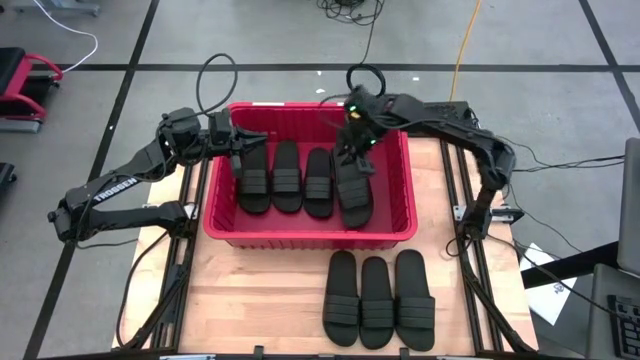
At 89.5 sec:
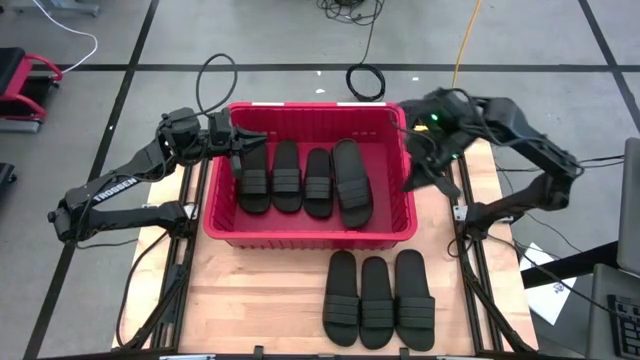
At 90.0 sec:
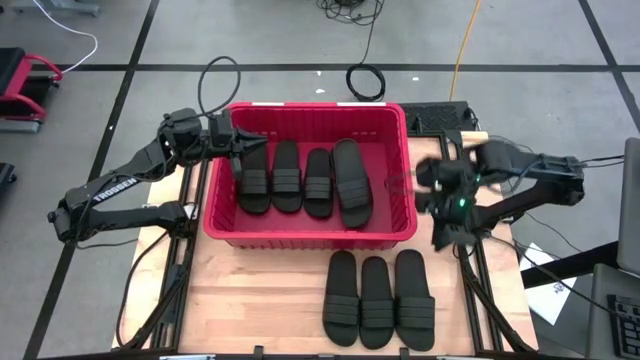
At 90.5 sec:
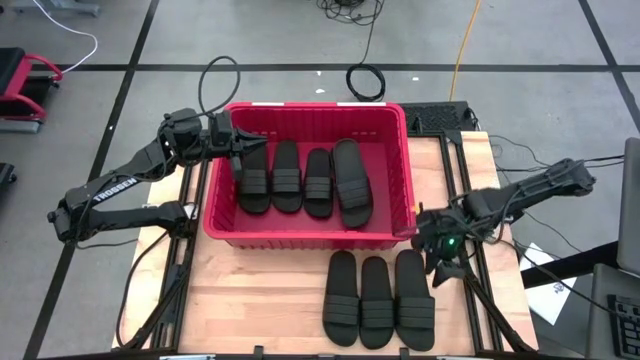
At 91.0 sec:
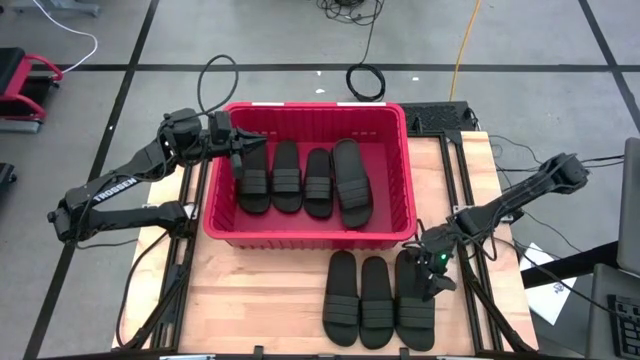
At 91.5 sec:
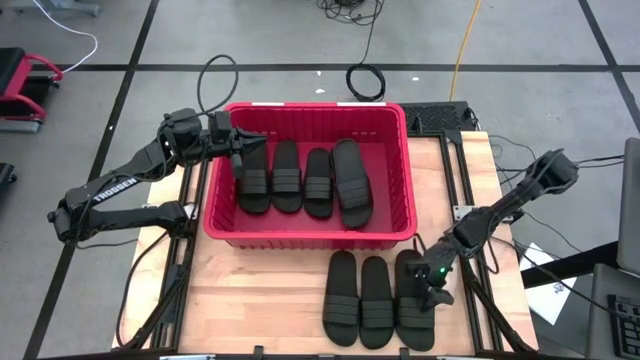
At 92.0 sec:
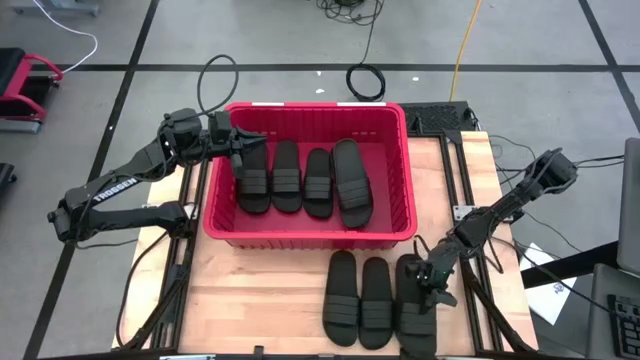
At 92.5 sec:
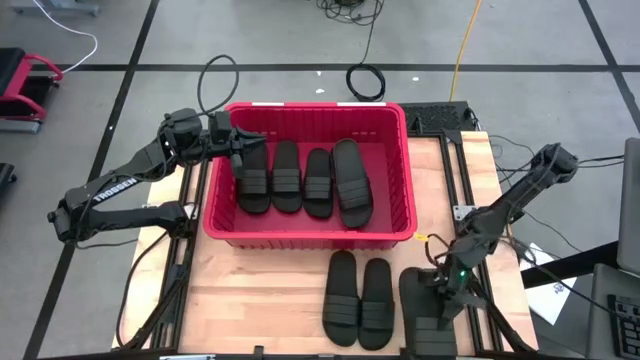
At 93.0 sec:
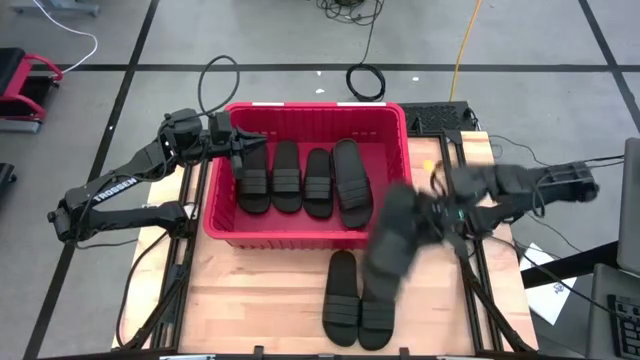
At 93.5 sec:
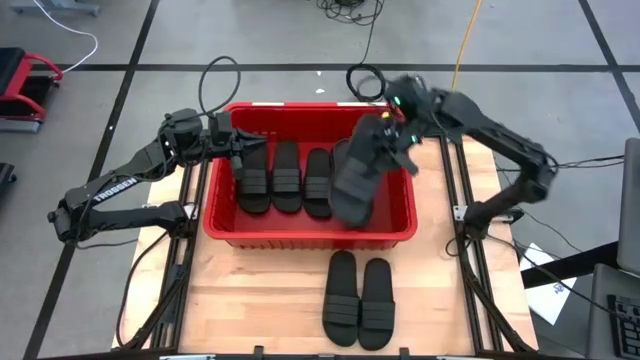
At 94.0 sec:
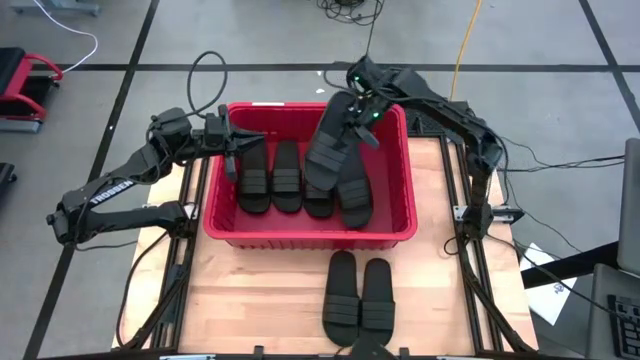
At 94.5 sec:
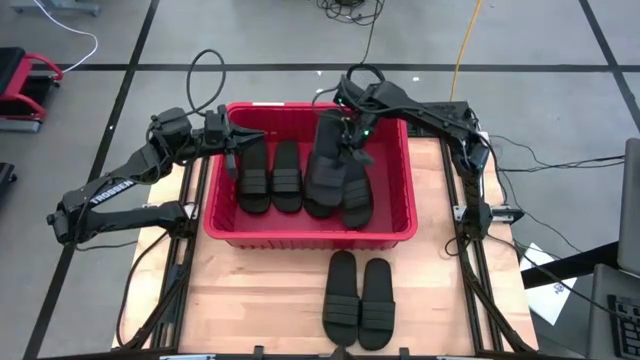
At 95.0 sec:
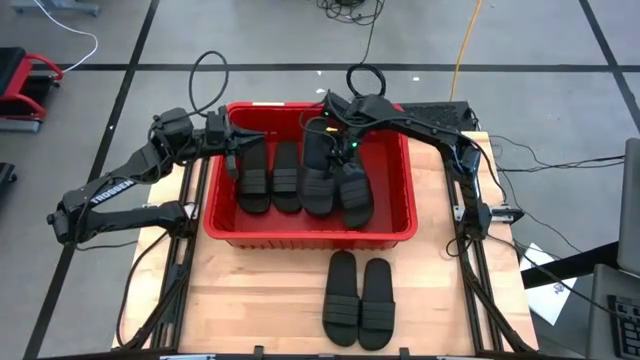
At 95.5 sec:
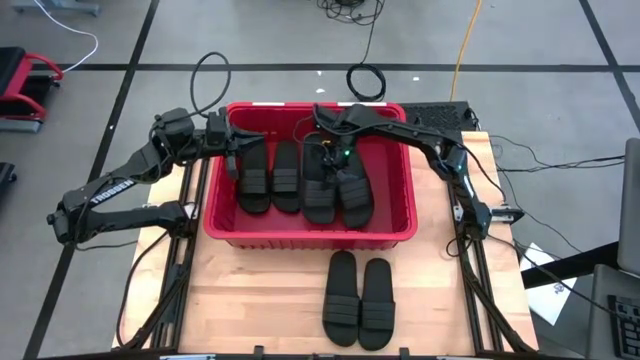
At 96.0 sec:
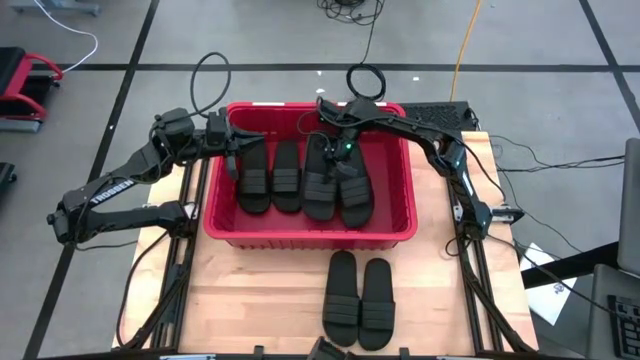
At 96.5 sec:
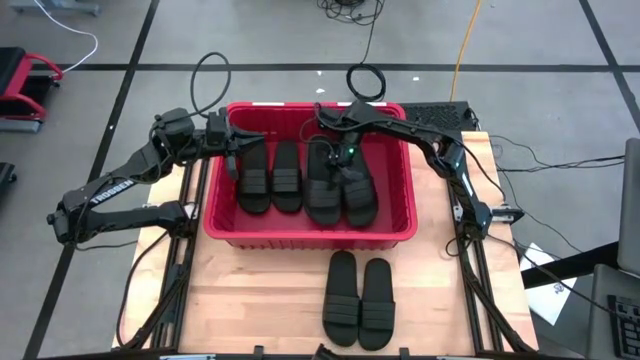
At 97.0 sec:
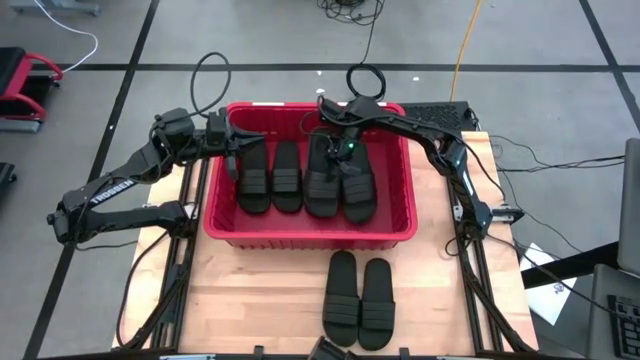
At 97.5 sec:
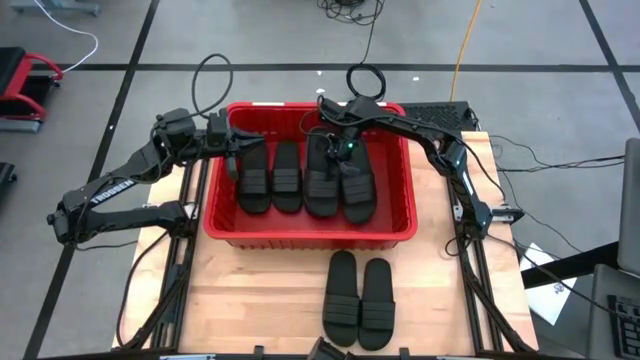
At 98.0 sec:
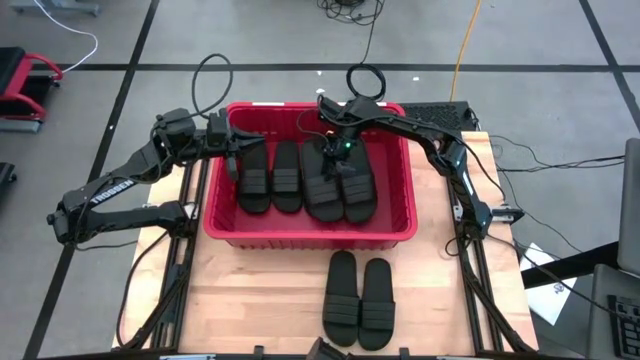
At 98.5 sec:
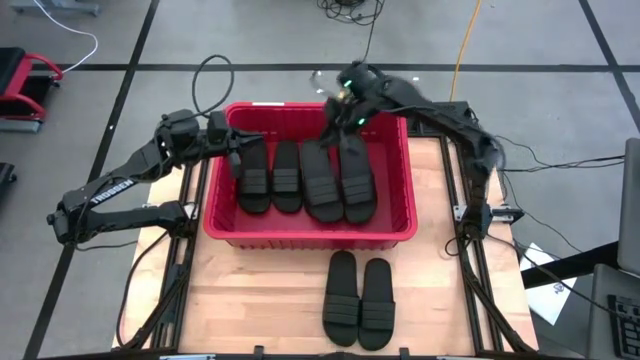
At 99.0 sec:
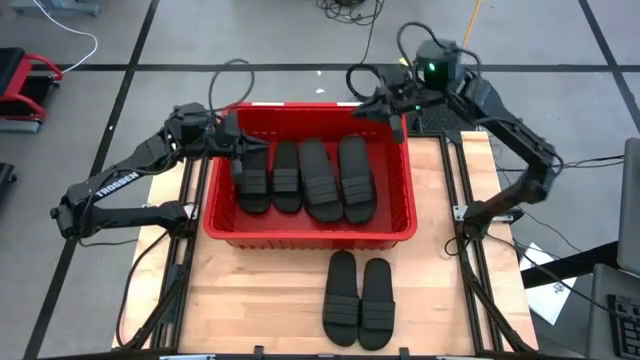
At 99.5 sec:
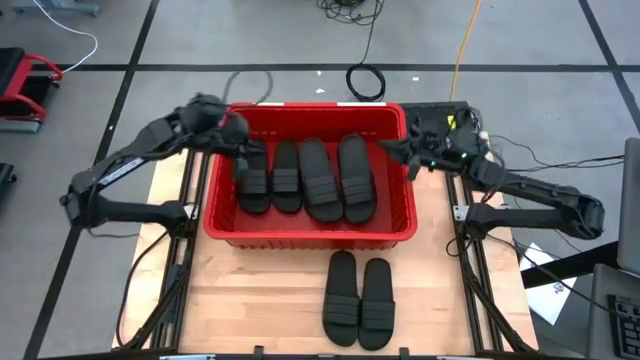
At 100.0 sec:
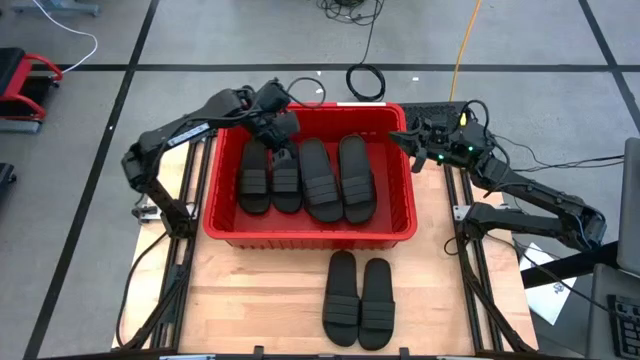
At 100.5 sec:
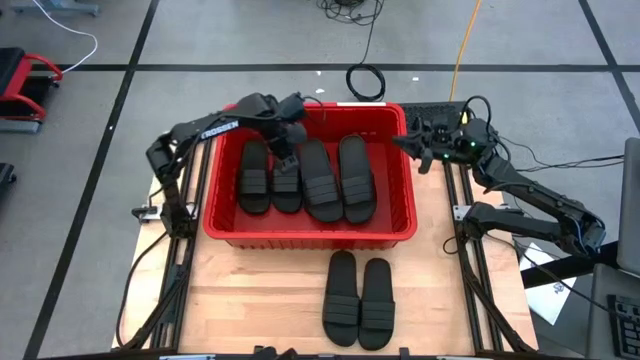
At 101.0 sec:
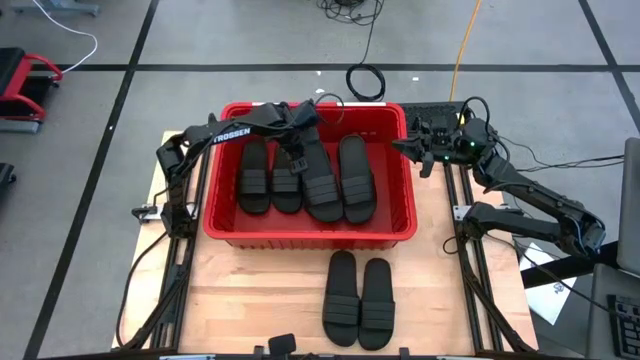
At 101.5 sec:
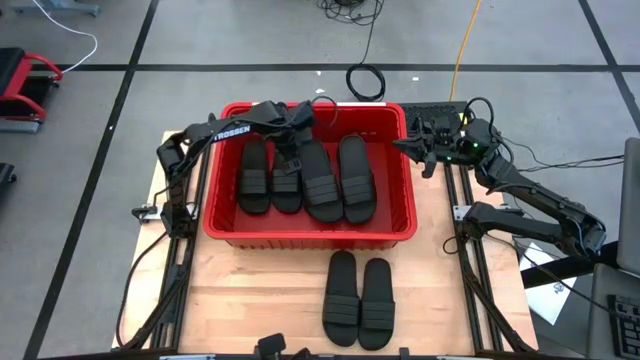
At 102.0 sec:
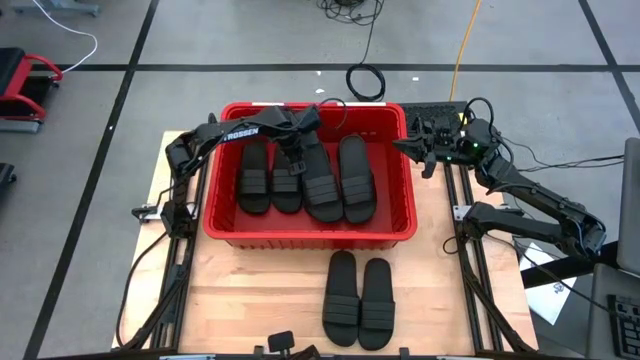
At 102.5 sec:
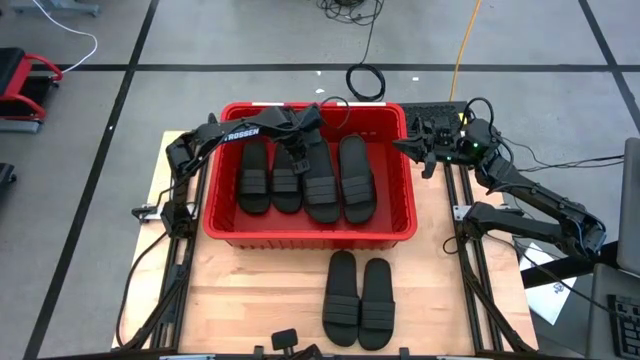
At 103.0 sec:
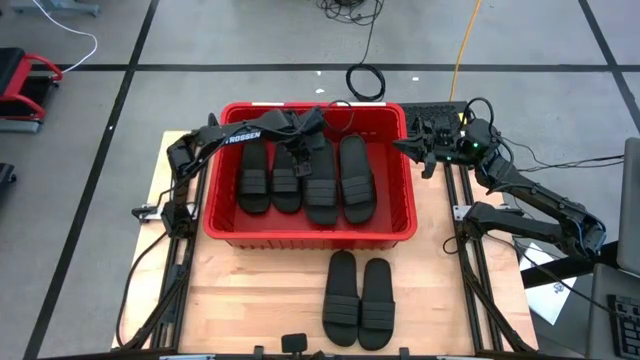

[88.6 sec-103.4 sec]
Task: Pick and place slides into bin
Put the slipper on top of the slipper inside the bin

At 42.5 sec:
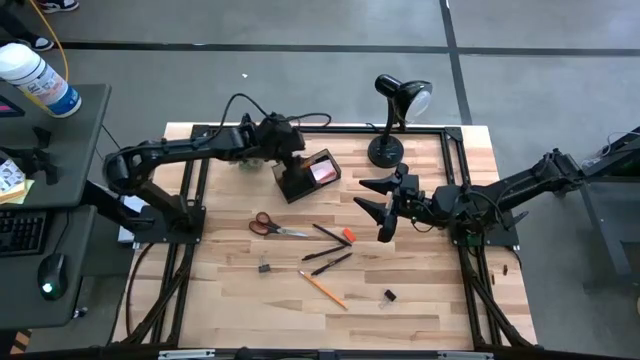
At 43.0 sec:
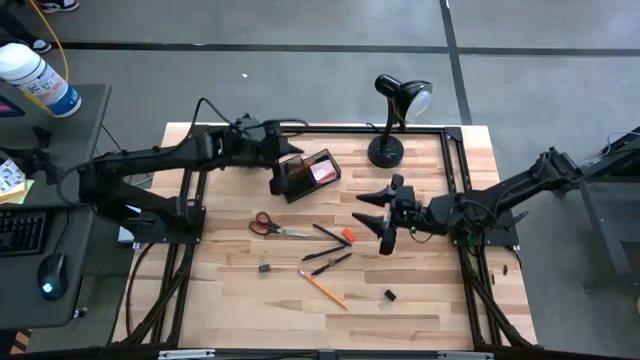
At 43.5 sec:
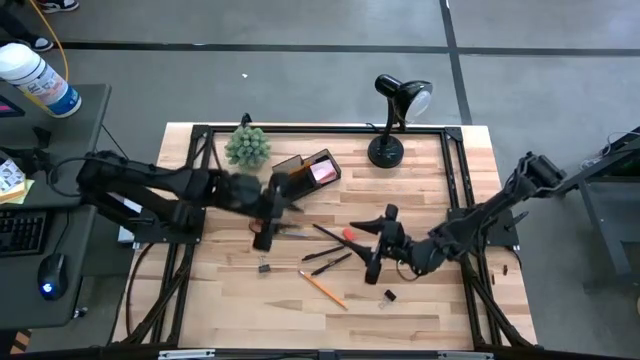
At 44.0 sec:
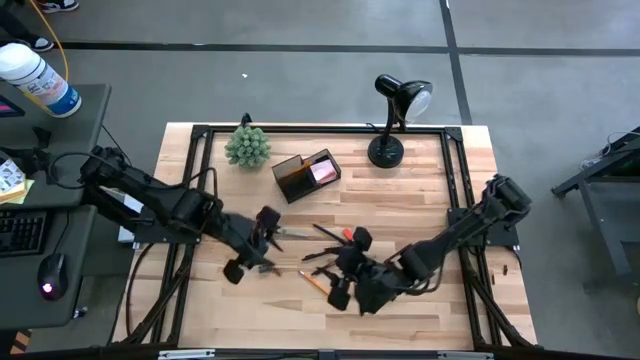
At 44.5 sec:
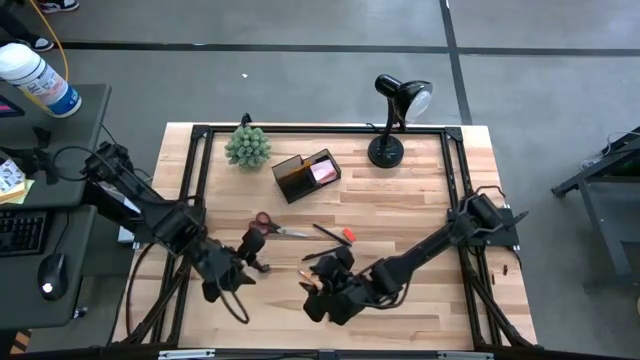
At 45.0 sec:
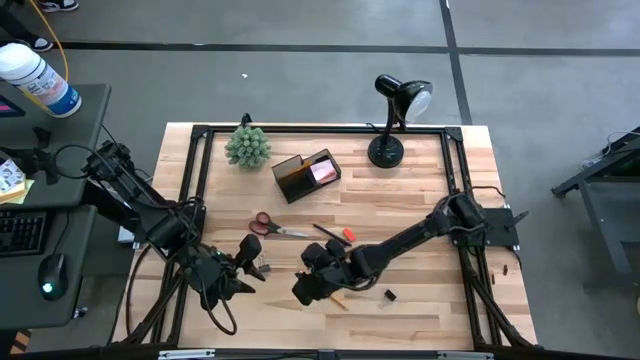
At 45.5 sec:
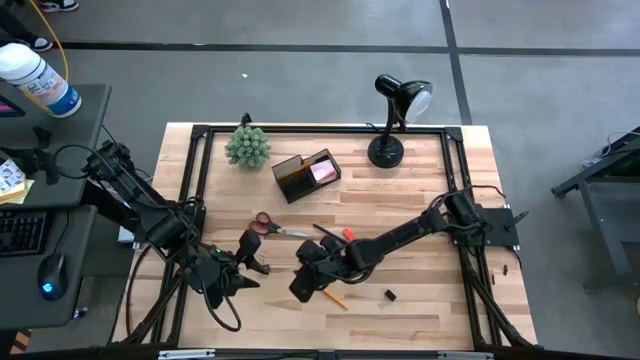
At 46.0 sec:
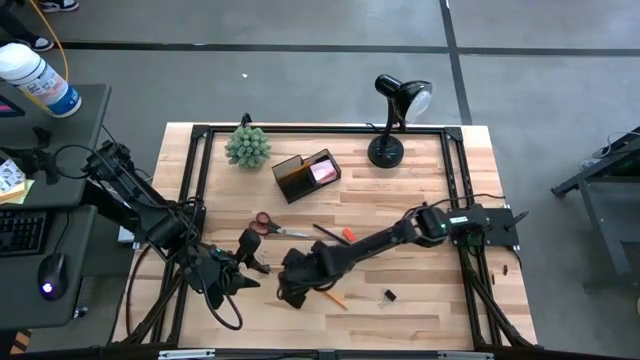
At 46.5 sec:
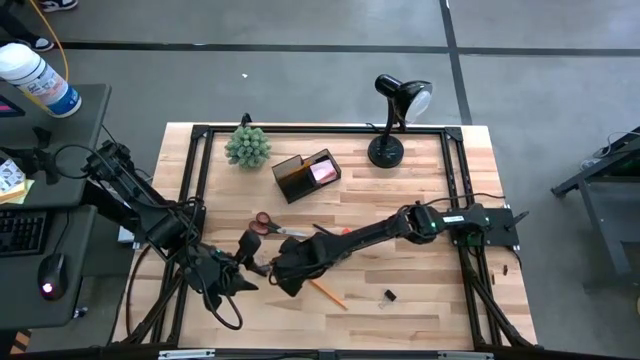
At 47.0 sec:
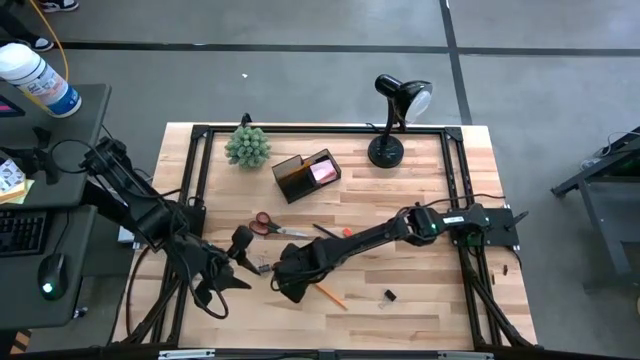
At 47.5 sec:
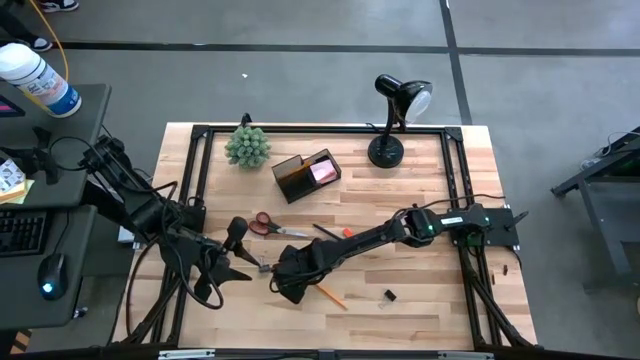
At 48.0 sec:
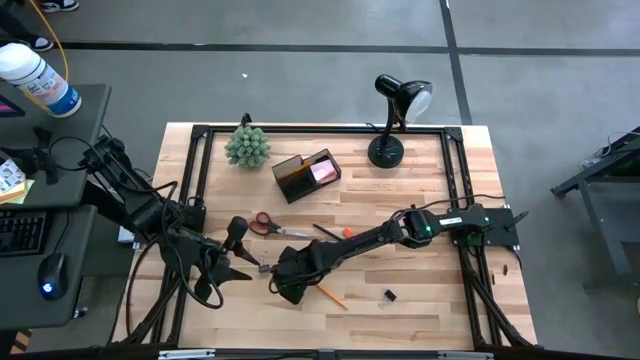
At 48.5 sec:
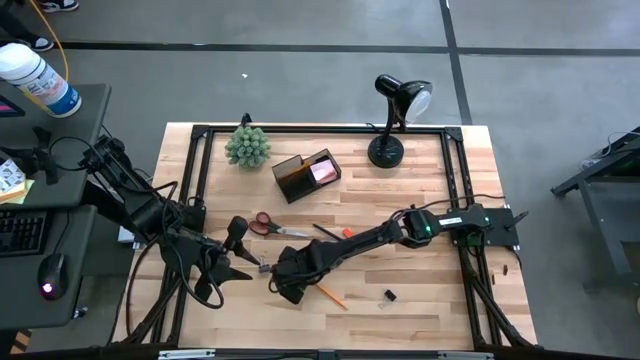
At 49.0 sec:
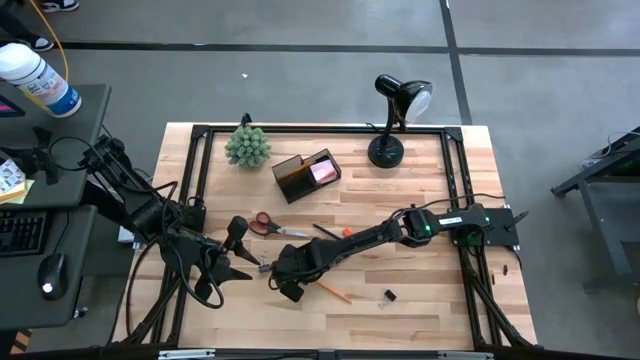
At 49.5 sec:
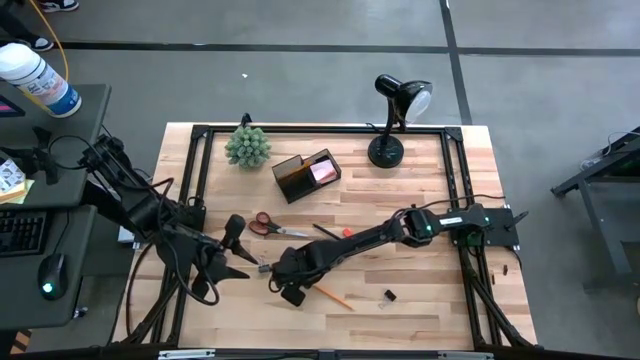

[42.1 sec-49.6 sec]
Task: Pick and place office supplies into organizer
Put the orange pencil into the black desk organizer
